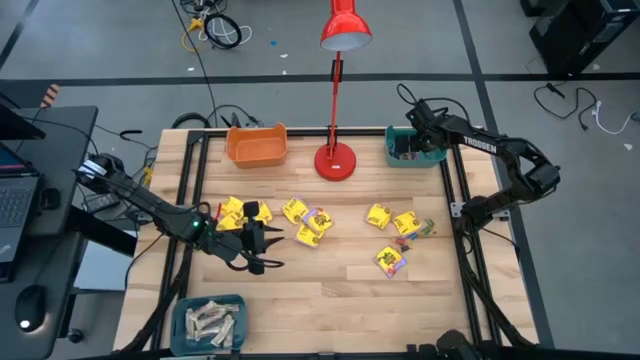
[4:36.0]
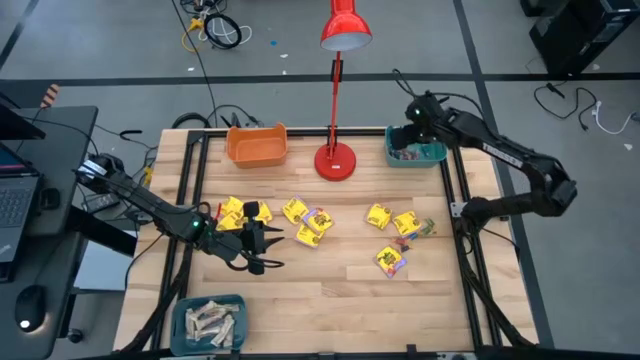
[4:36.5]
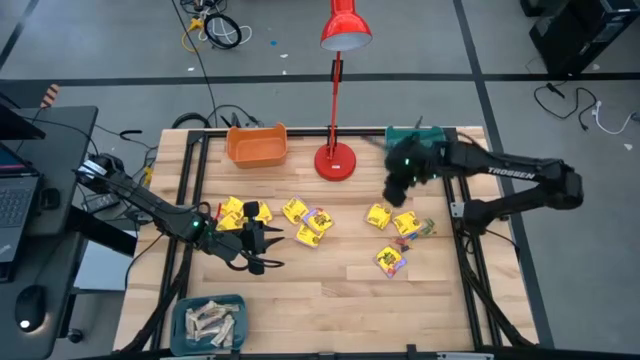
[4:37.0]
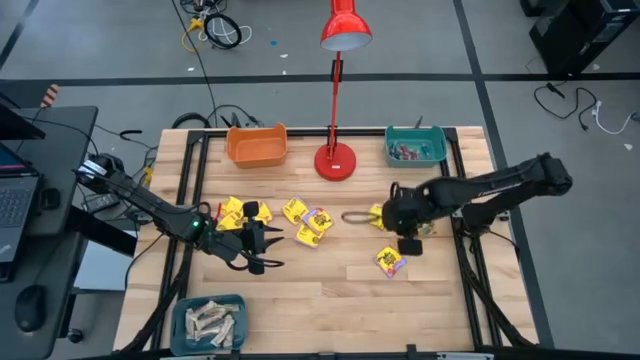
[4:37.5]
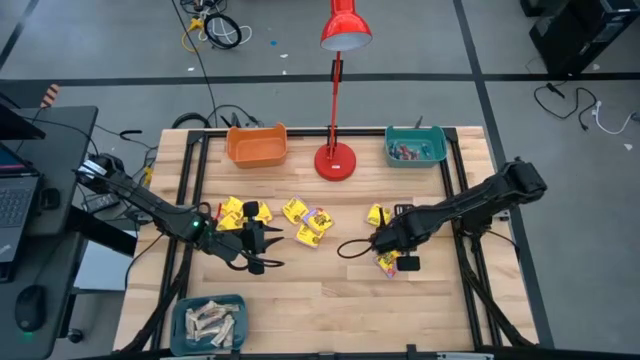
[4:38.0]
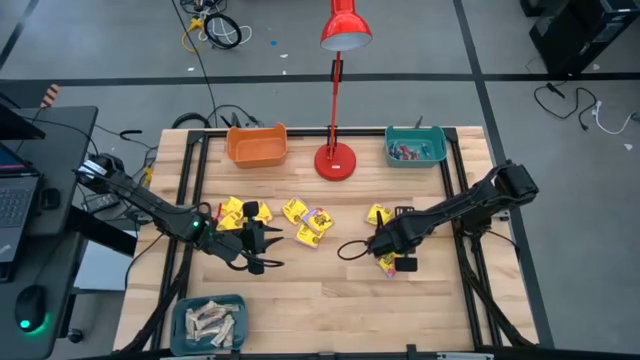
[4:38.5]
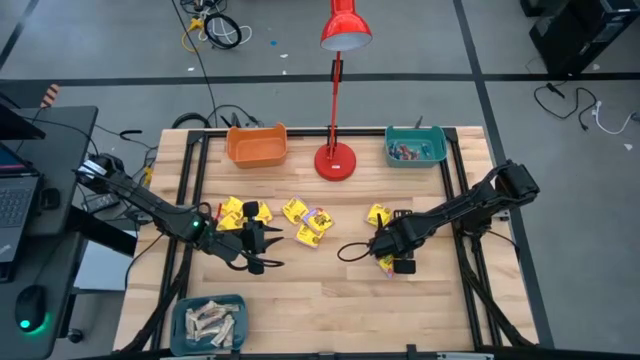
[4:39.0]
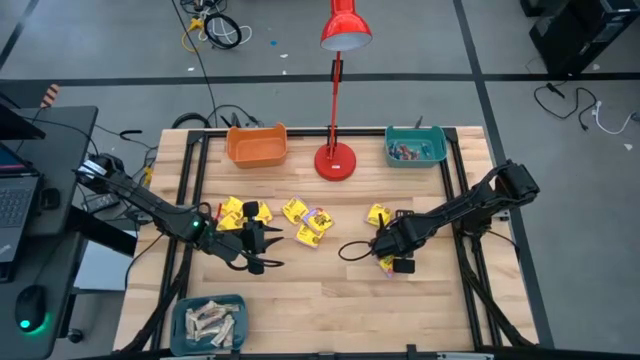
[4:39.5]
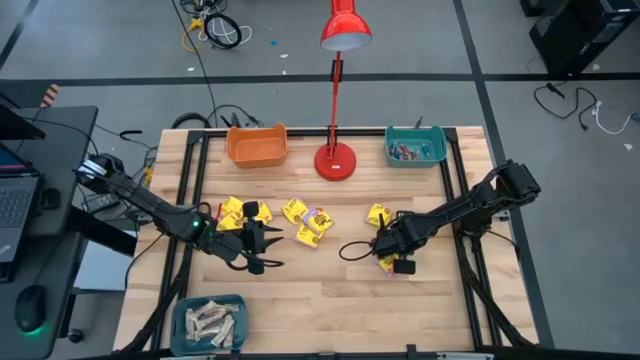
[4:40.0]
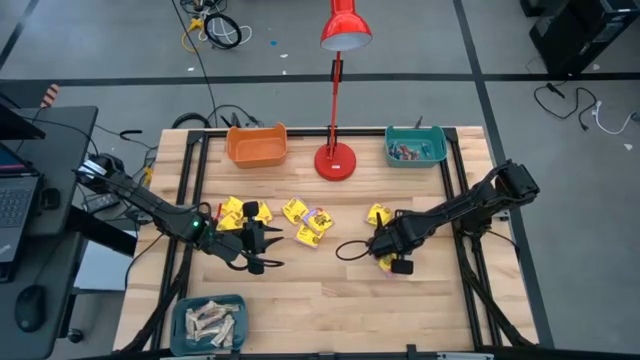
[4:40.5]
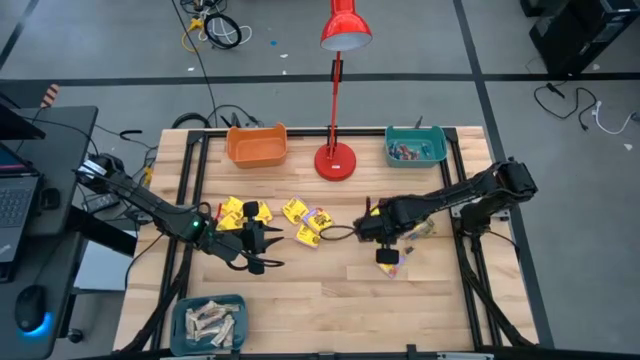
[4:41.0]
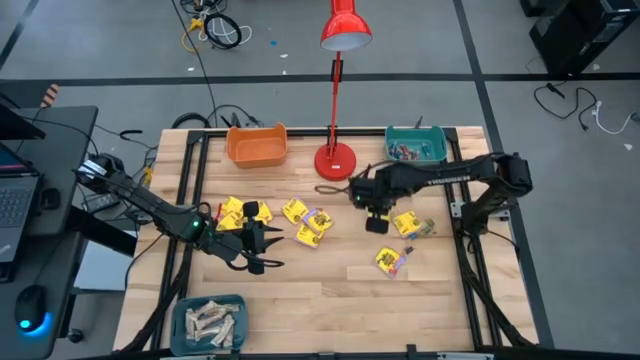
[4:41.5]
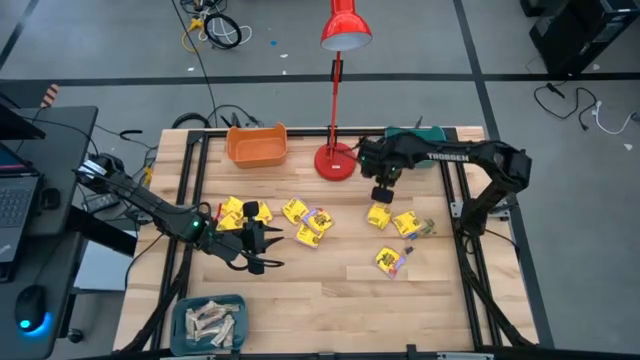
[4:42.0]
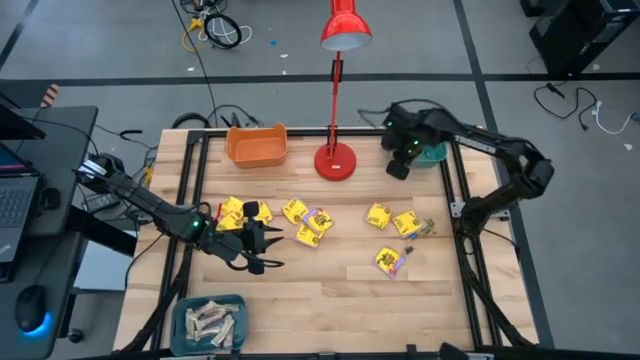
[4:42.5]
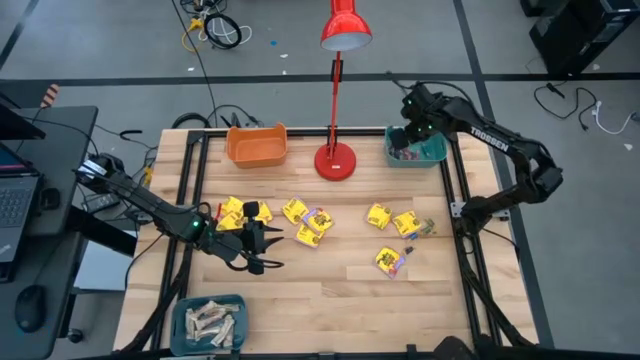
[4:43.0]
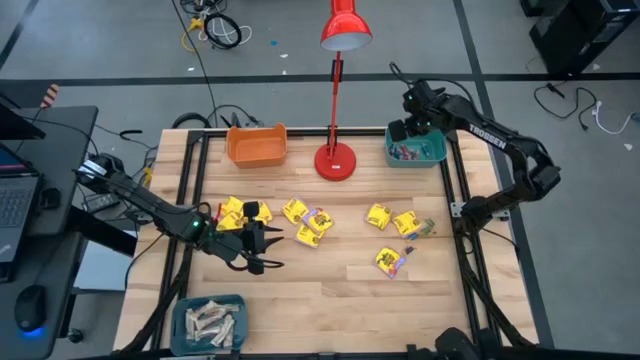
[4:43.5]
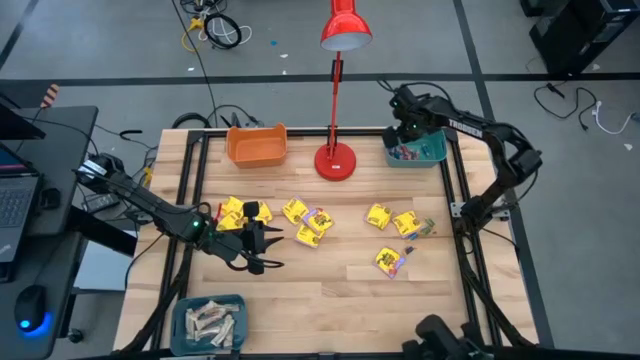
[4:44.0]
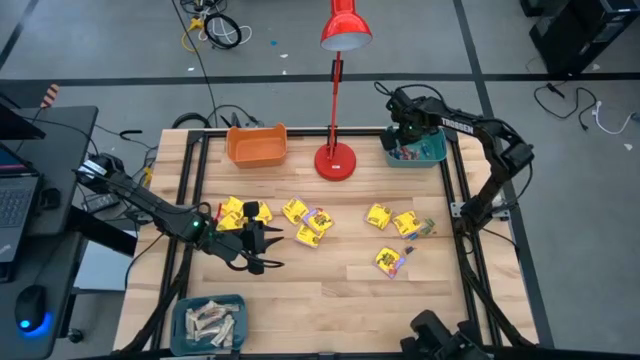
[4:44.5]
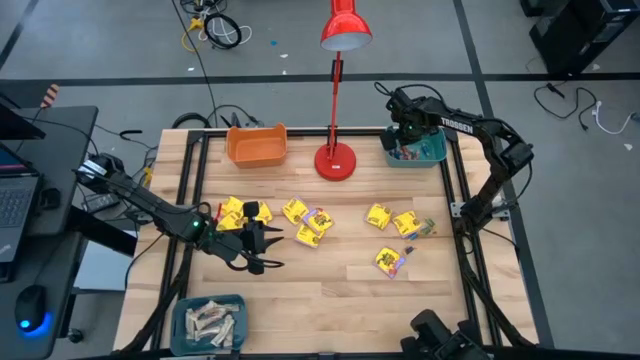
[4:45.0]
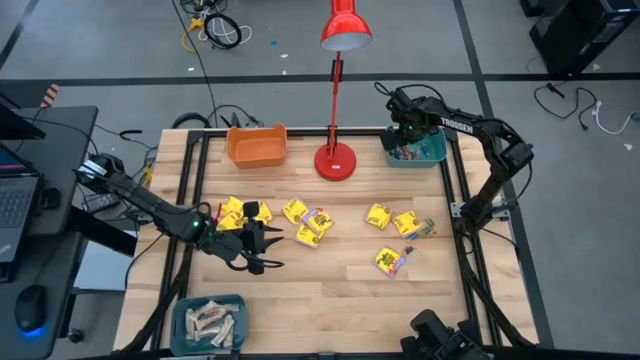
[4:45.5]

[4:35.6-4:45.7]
Task: Sort candy
Put the small red candy into the green bin

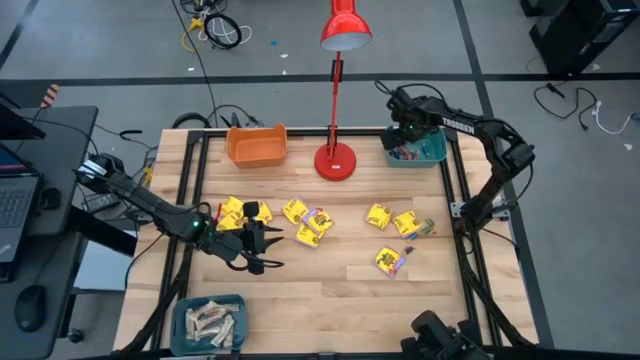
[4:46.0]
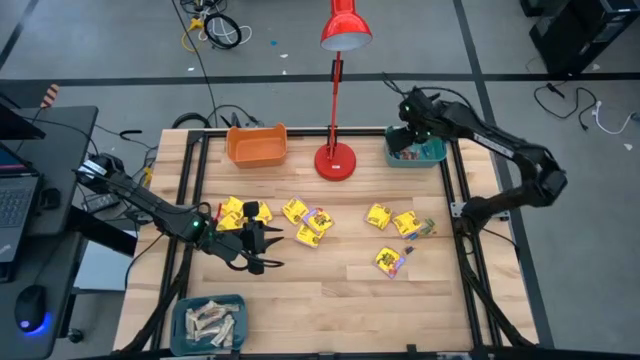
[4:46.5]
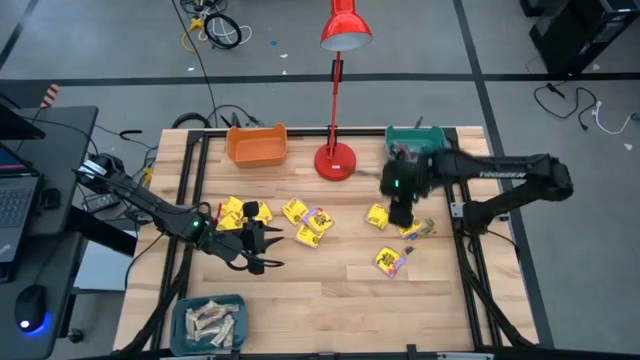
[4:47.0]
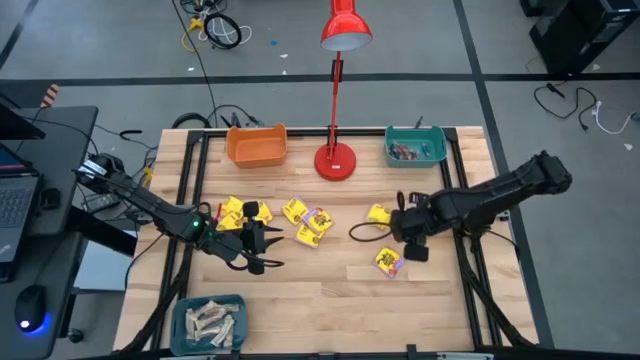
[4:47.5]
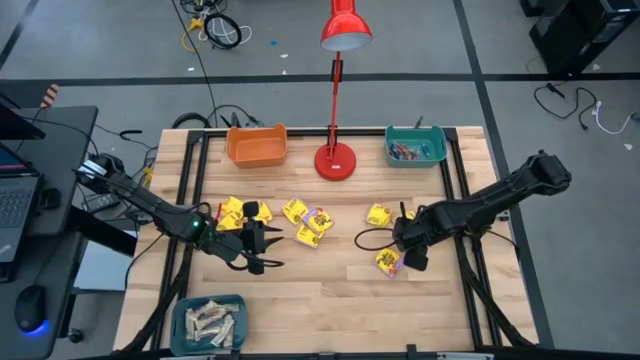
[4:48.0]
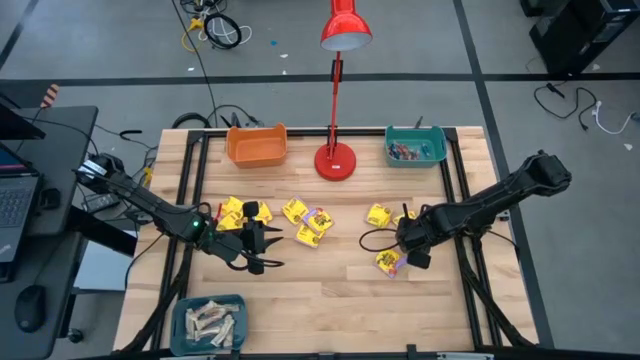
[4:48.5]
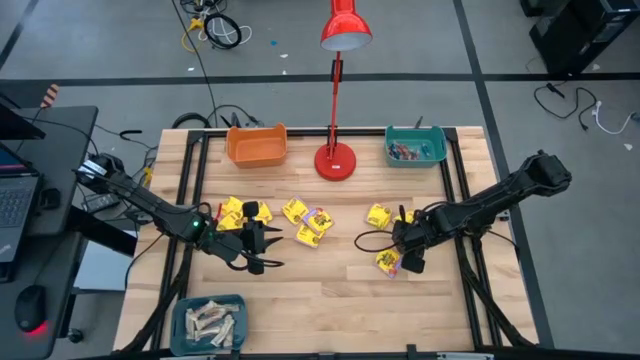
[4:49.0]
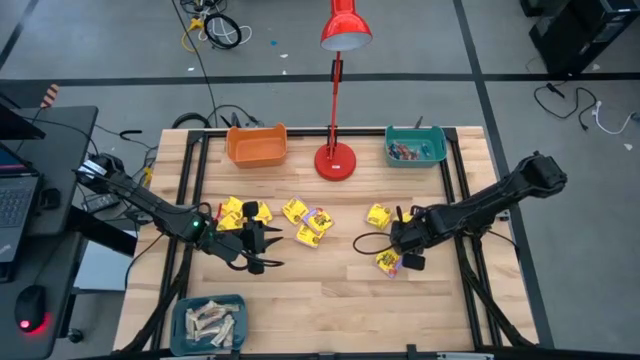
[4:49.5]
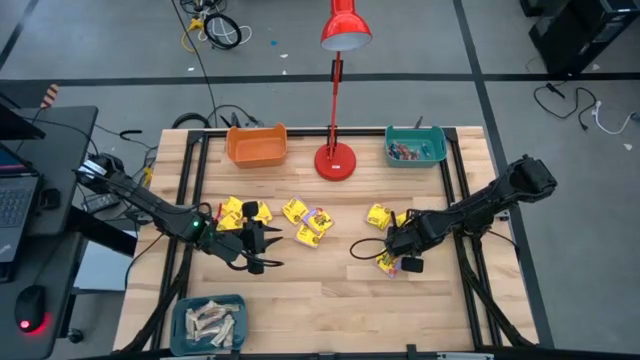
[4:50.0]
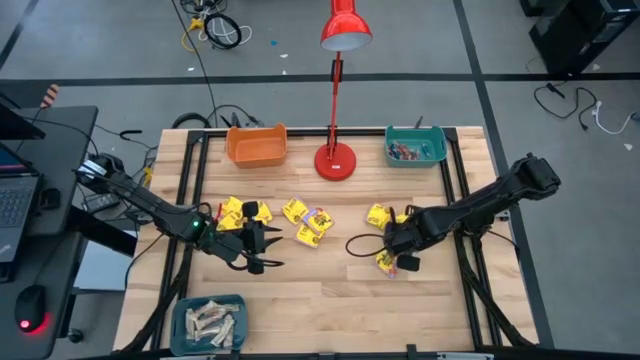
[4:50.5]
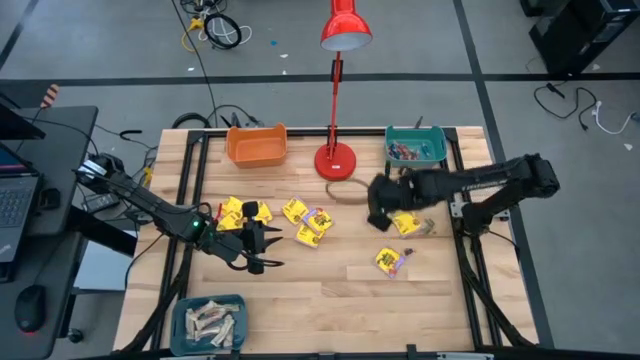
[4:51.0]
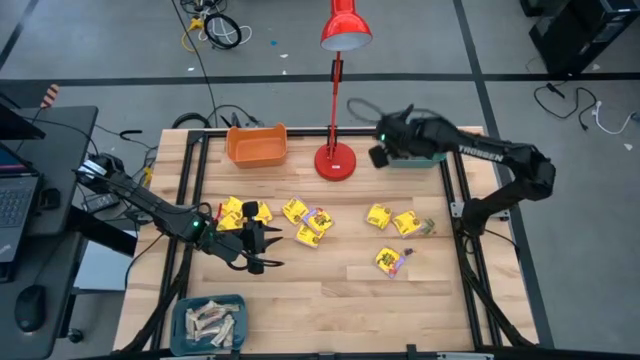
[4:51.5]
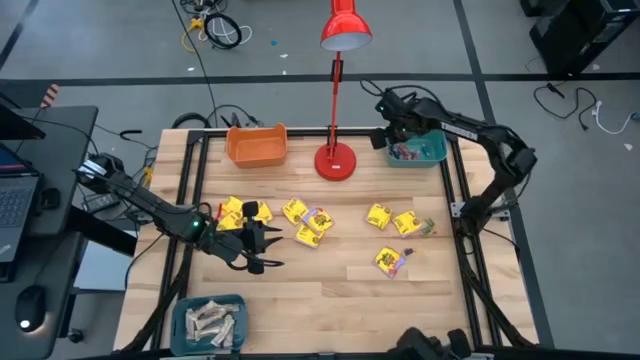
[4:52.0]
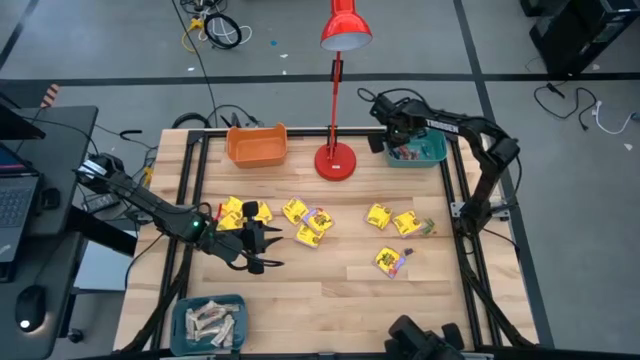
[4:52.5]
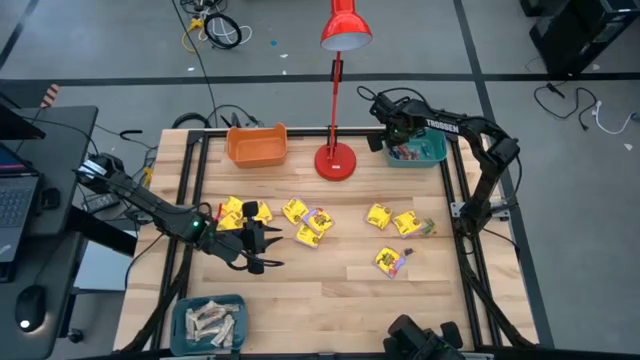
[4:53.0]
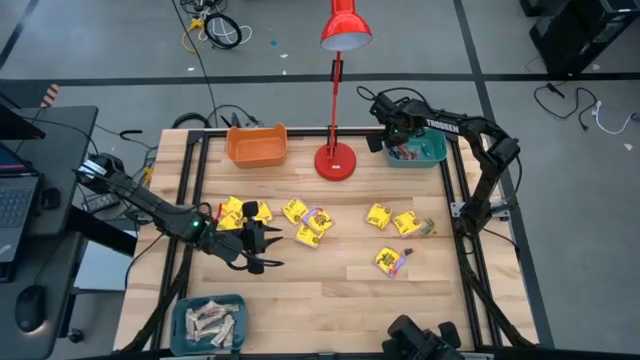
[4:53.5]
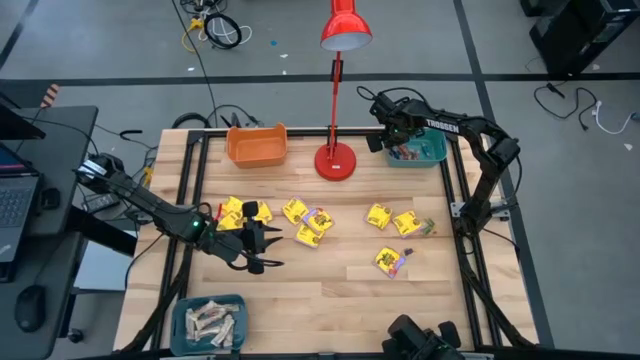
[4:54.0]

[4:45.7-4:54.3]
Put the small blue candy into the green bin

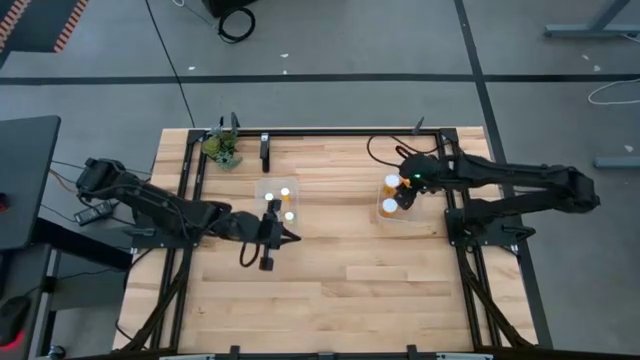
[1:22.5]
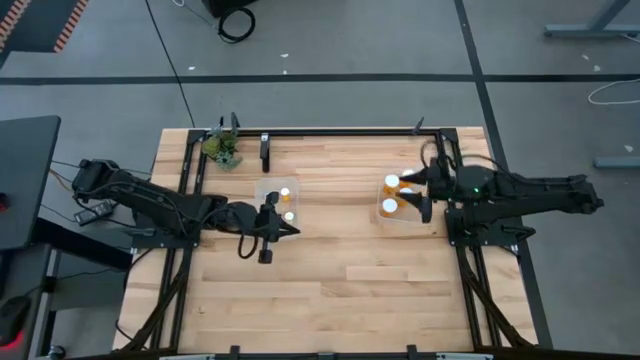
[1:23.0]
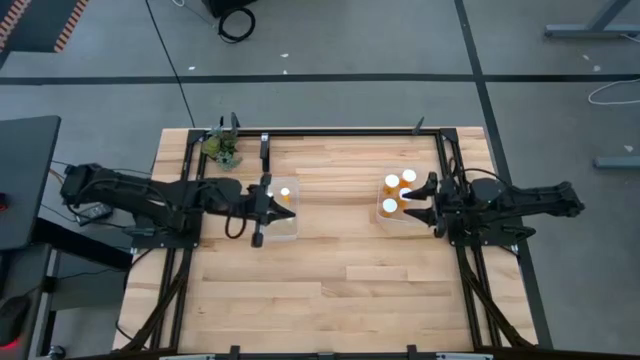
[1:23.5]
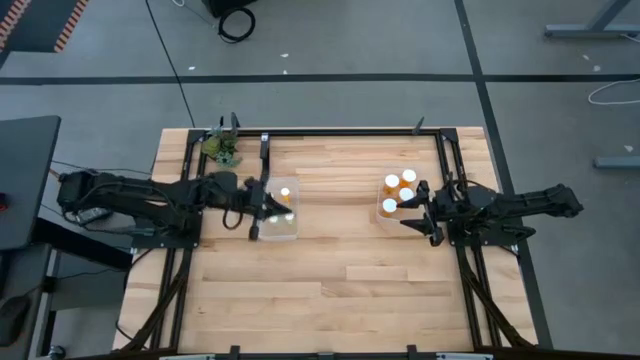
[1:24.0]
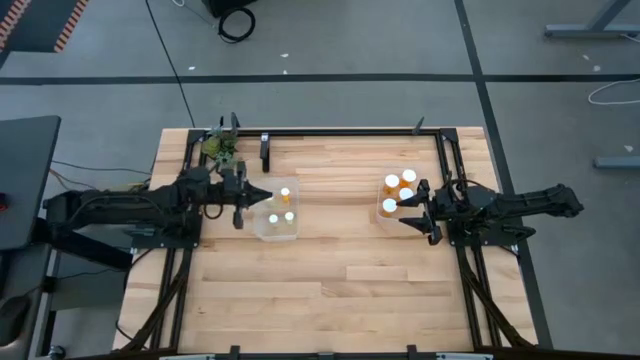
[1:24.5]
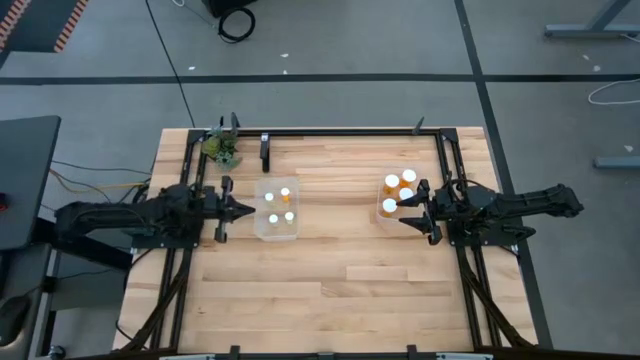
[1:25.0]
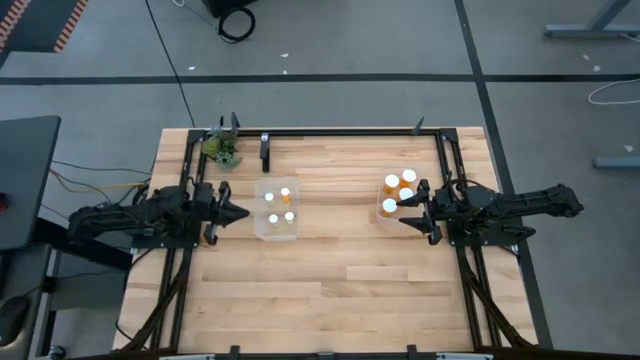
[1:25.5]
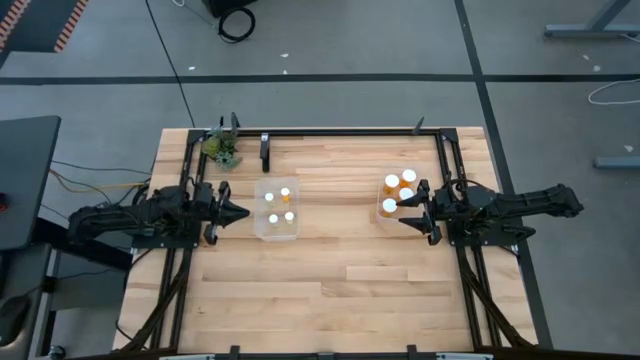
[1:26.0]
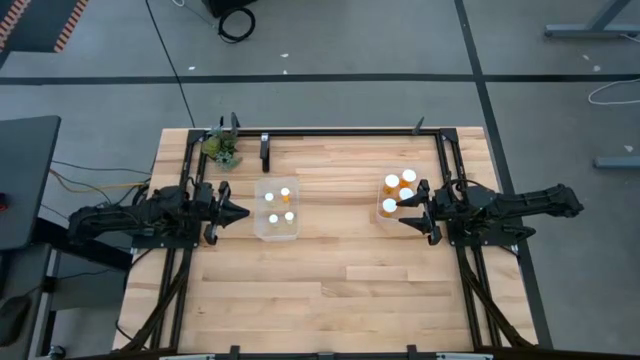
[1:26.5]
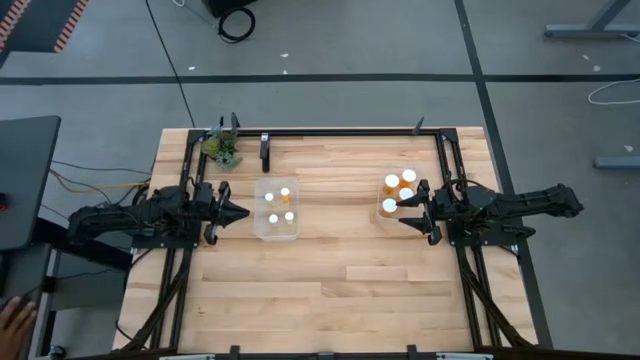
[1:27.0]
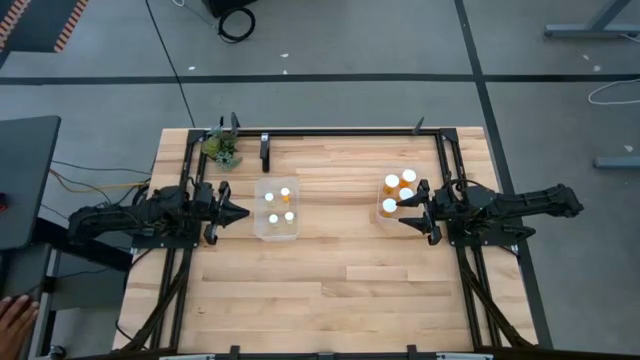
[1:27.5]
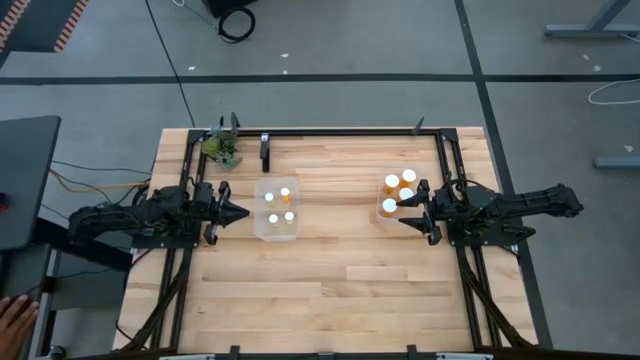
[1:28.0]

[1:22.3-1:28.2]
Task: Pick and place medicine bottles into bin by pill shape (circle, oval)
Return to Home Position
